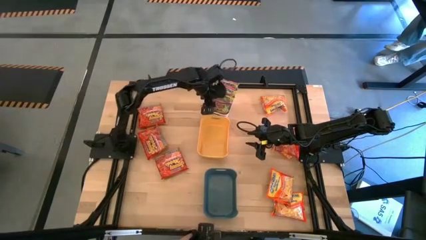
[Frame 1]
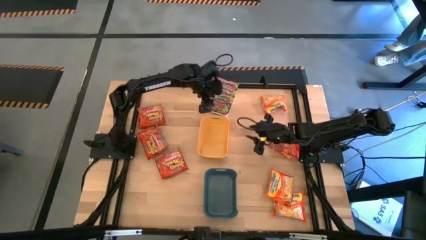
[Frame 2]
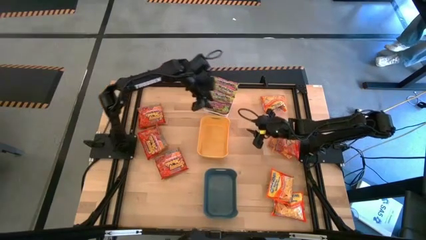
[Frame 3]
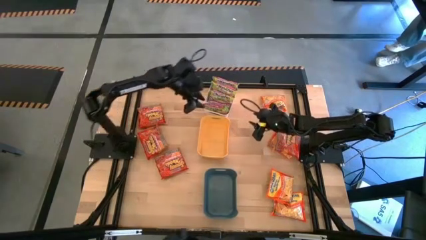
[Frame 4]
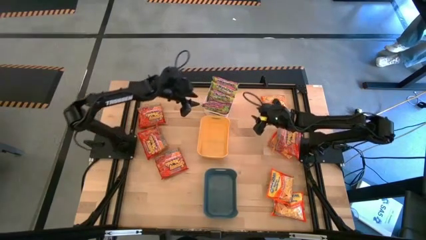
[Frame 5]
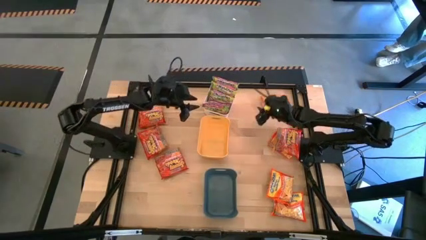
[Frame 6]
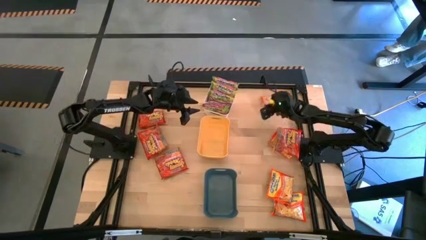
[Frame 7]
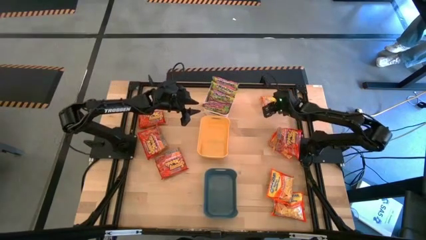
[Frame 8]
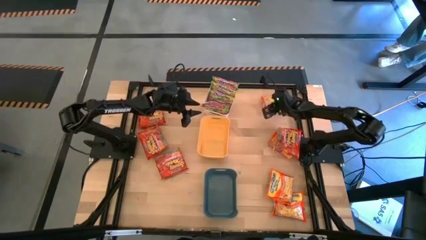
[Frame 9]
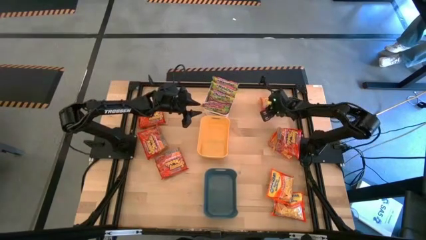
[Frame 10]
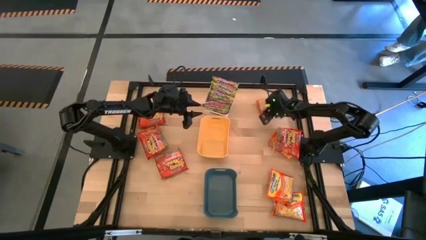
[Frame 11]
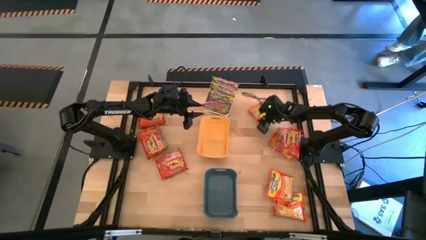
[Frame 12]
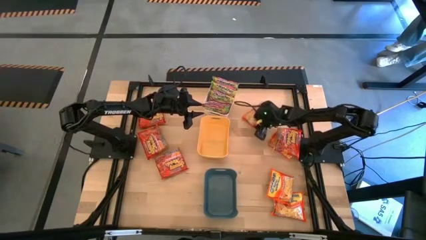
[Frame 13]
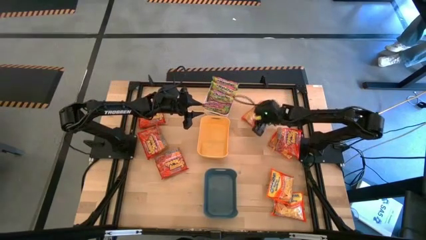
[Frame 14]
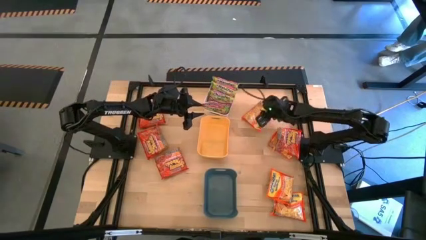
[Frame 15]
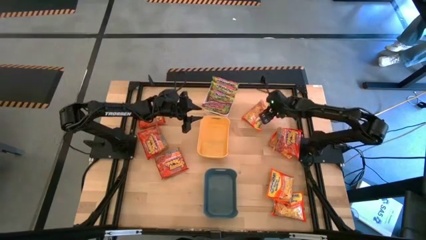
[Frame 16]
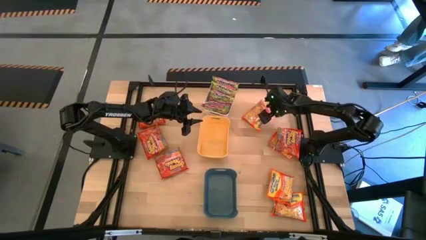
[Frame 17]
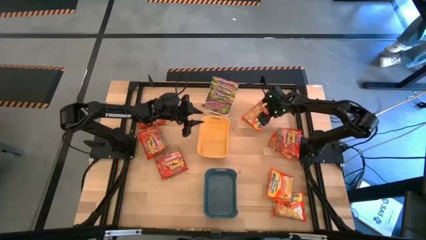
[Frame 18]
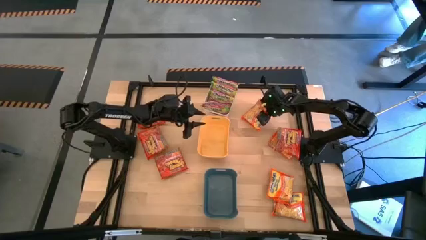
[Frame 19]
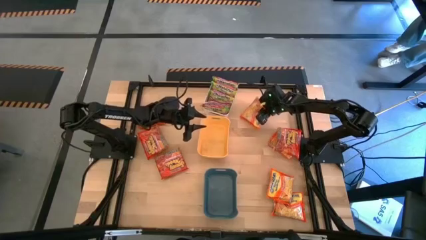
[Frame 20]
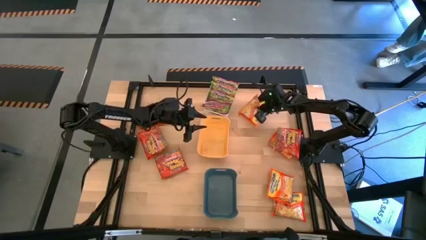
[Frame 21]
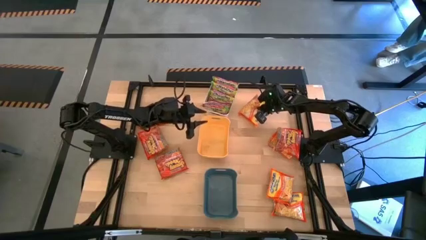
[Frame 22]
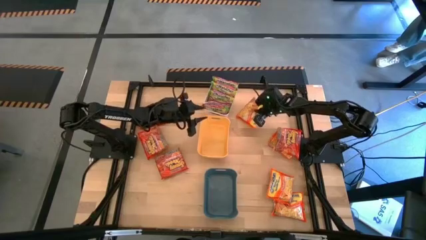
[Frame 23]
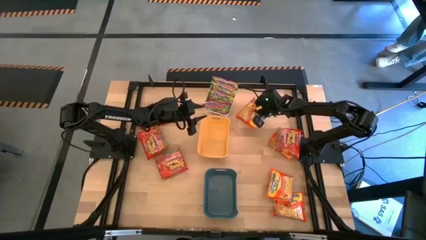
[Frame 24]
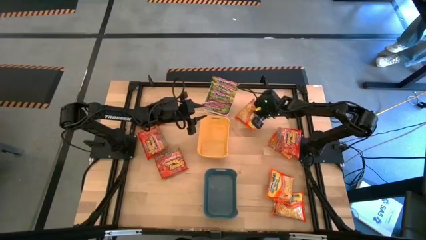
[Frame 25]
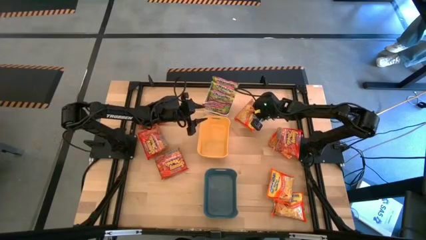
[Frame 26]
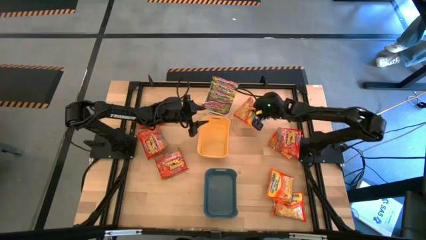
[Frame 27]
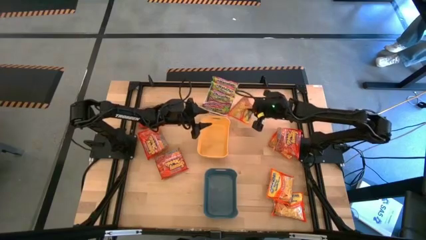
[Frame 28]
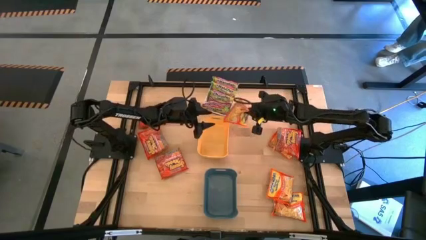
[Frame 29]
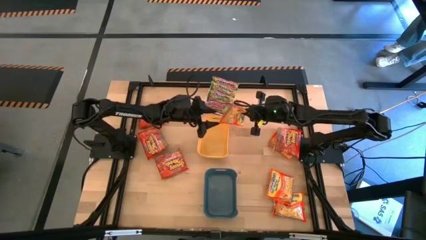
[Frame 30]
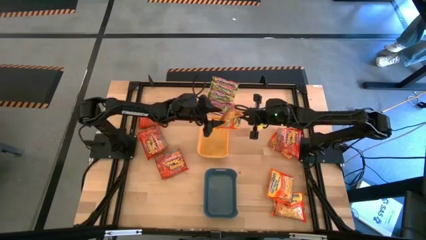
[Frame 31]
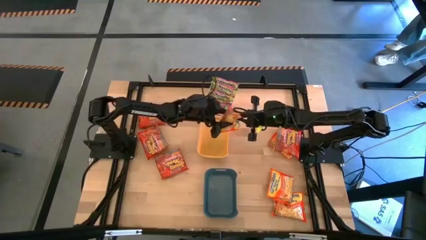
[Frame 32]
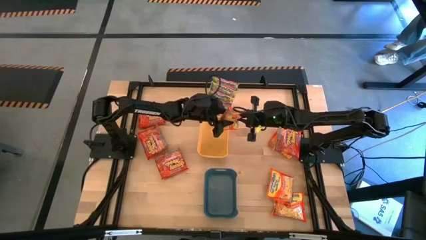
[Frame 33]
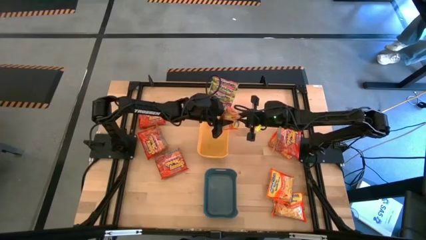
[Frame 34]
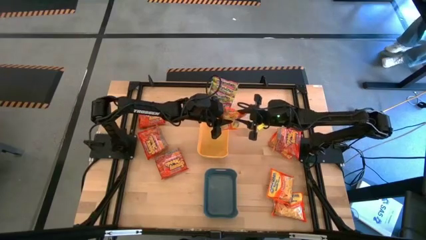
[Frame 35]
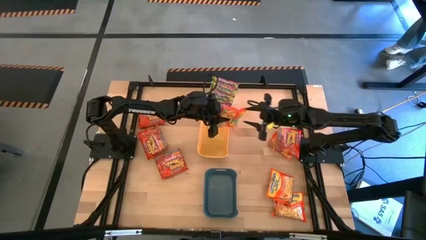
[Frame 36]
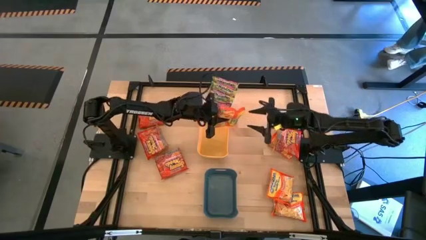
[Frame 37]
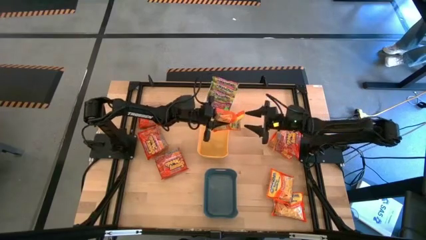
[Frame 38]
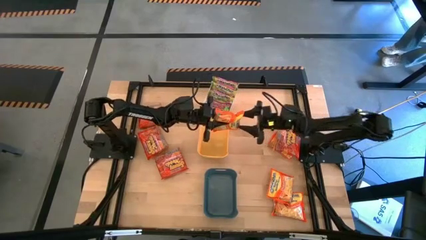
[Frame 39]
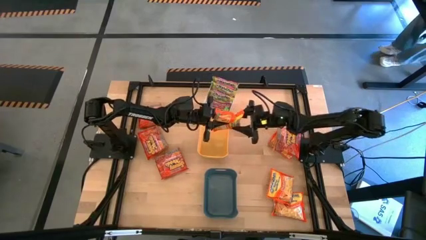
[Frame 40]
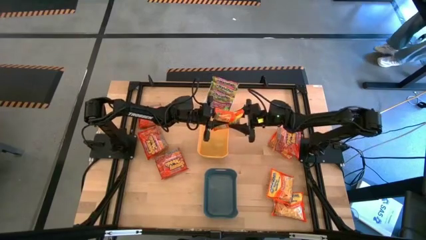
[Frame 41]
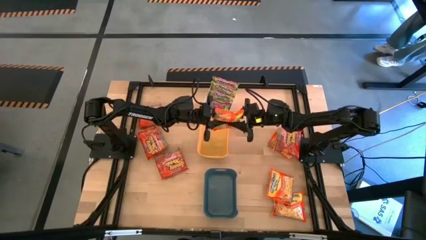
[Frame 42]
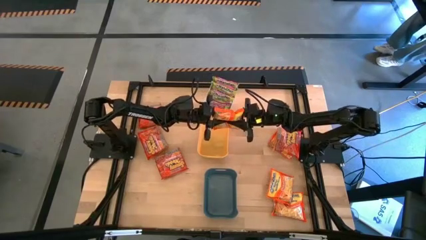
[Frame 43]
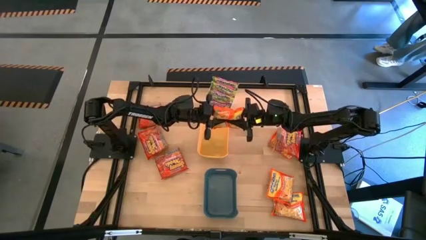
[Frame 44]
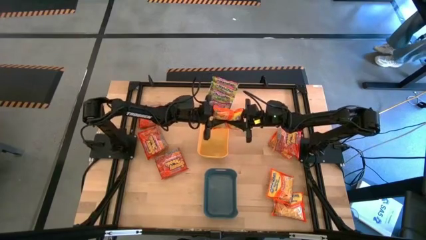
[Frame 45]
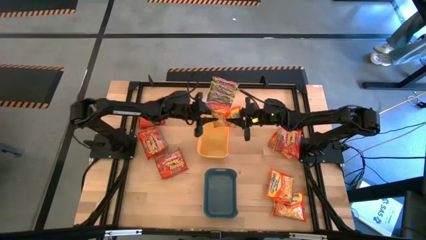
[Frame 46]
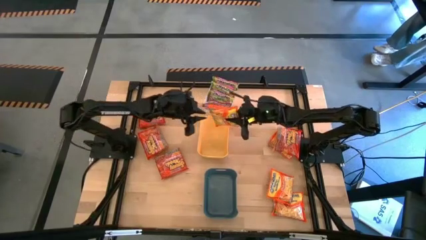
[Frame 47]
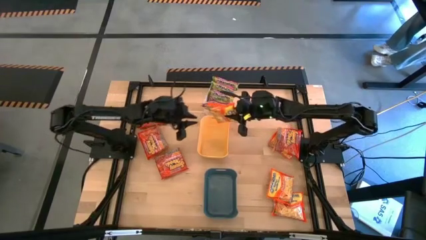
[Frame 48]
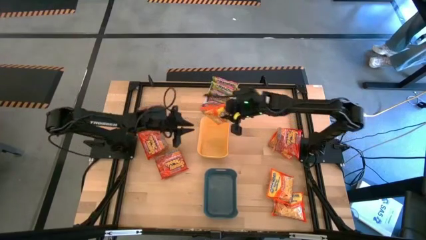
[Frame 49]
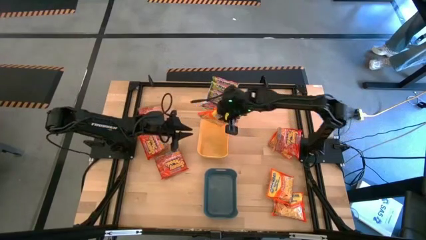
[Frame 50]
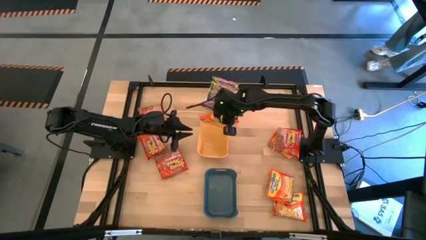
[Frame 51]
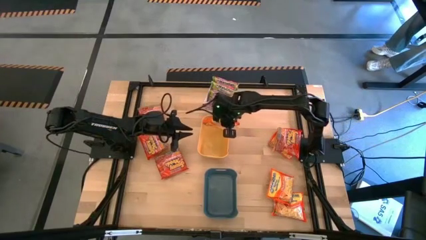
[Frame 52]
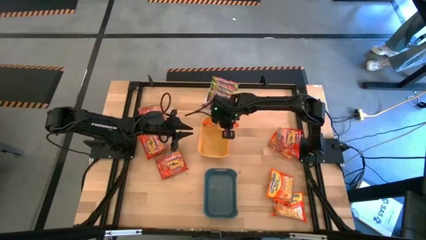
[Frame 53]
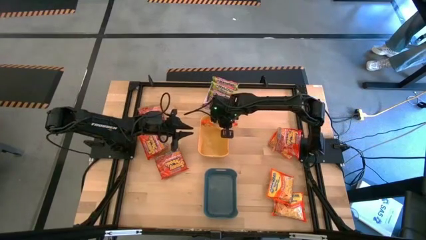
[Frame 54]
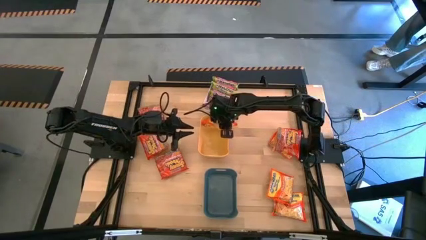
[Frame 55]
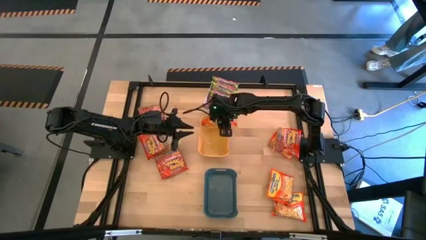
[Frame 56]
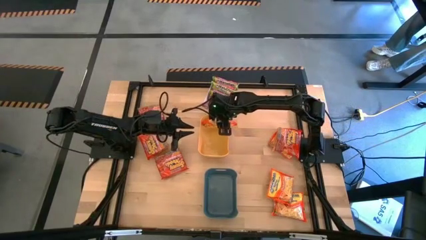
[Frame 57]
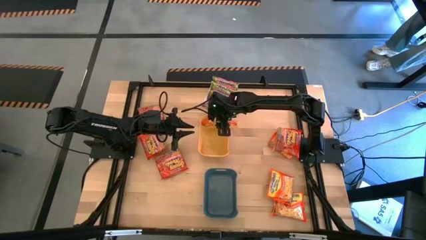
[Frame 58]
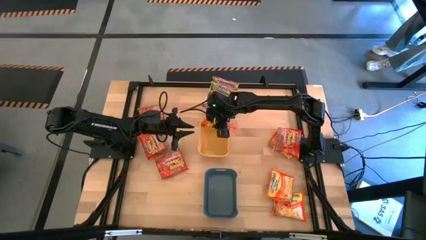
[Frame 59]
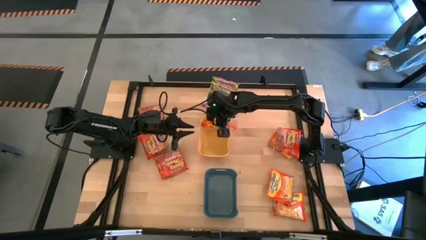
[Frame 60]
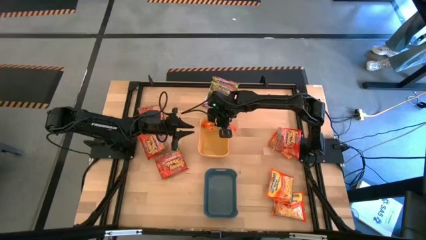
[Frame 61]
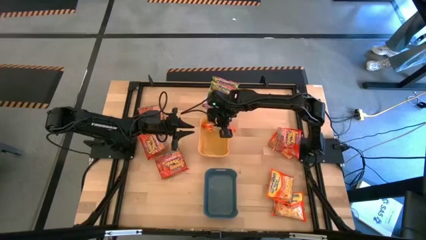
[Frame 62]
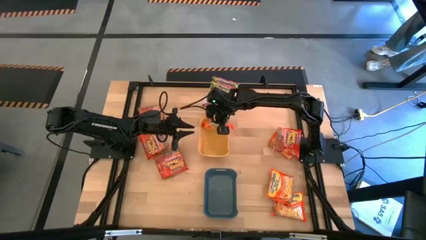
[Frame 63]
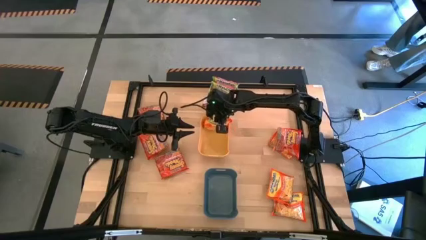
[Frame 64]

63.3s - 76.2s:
Task: Sort Maruchan noodles
Put the yellow noodle pack into the yellow bin
